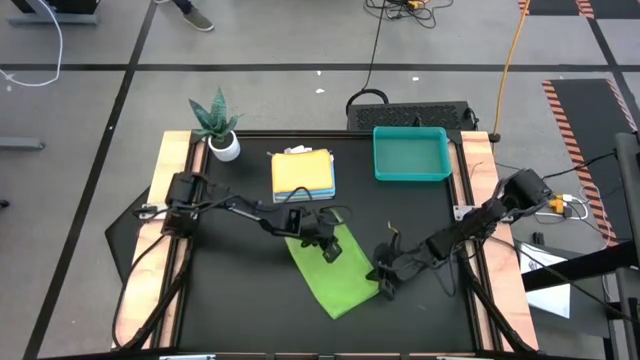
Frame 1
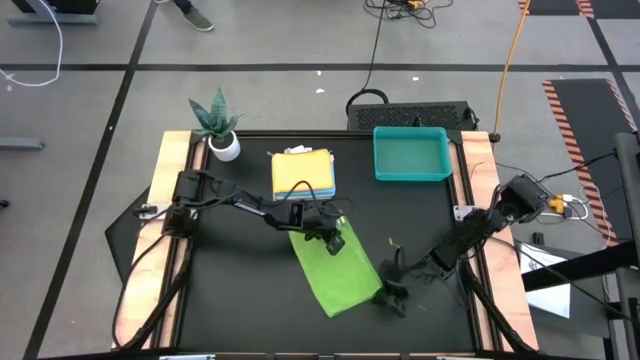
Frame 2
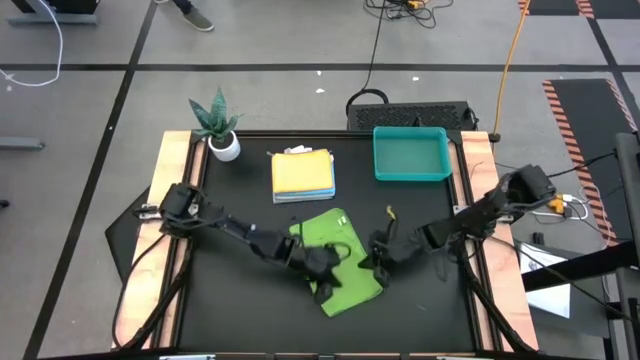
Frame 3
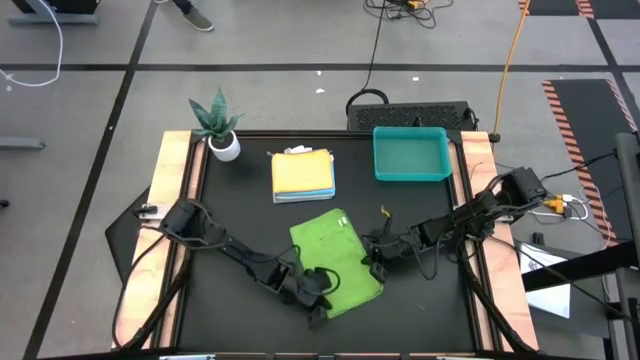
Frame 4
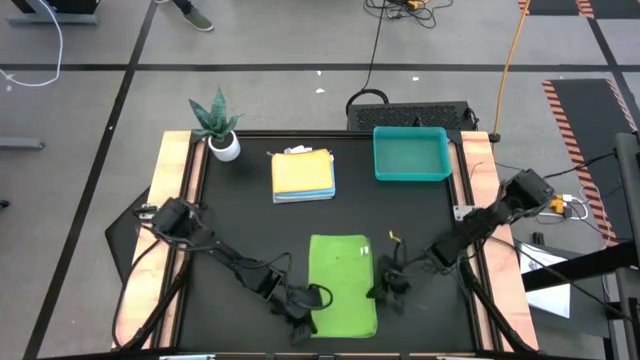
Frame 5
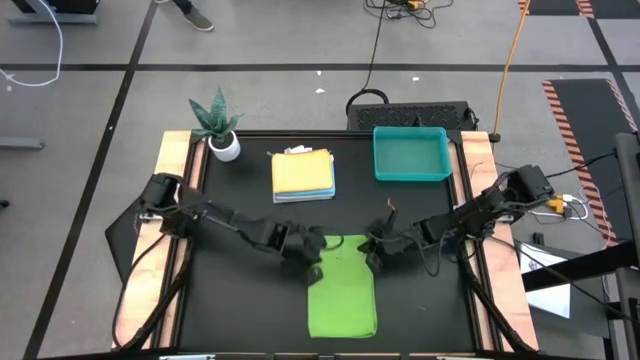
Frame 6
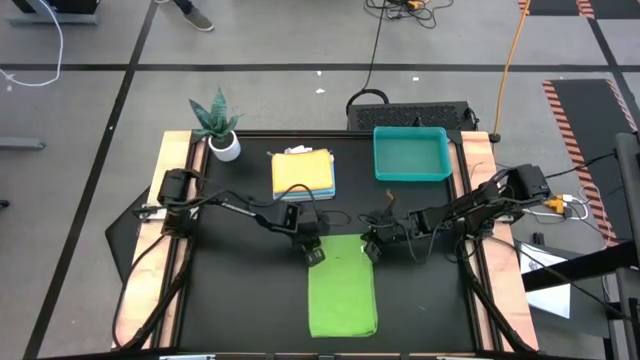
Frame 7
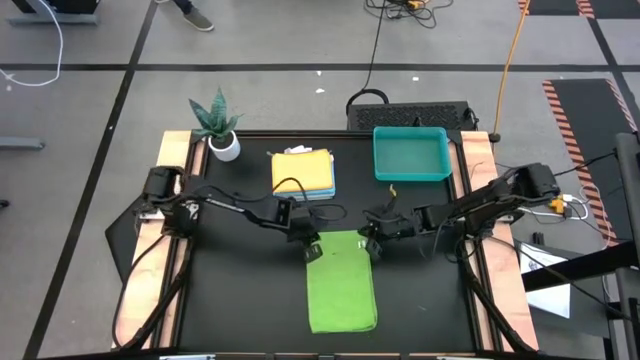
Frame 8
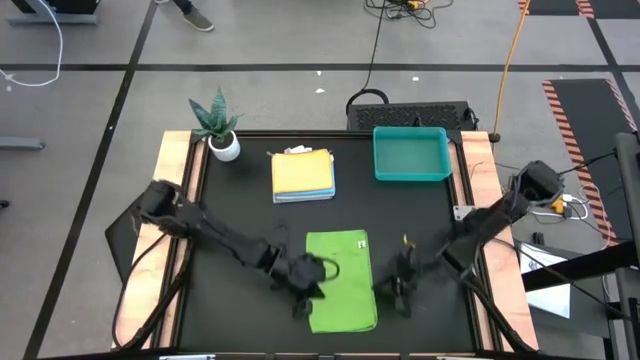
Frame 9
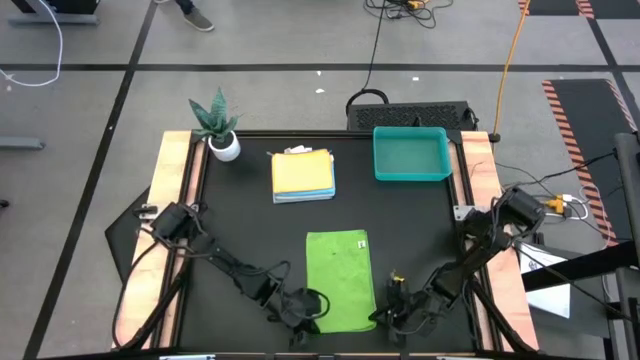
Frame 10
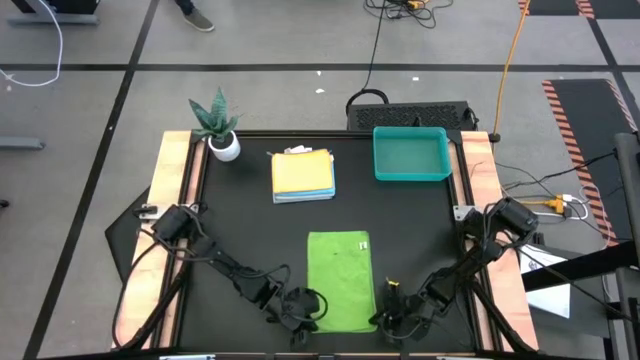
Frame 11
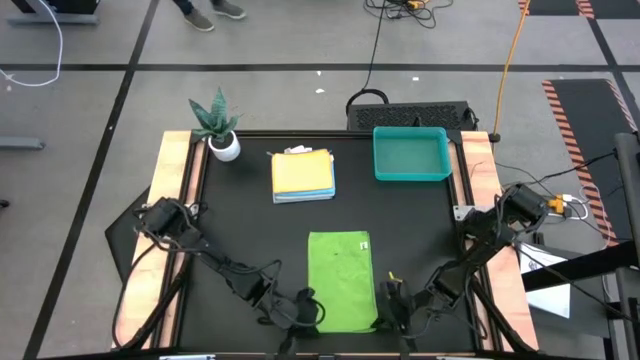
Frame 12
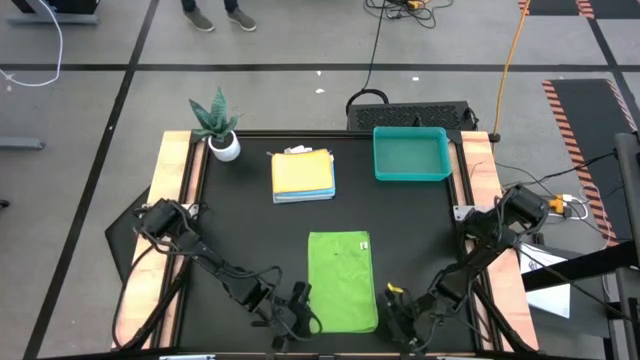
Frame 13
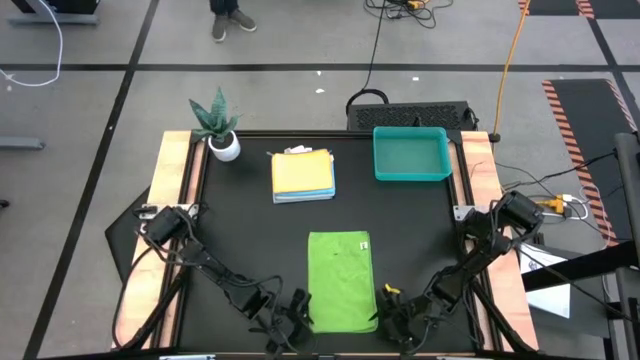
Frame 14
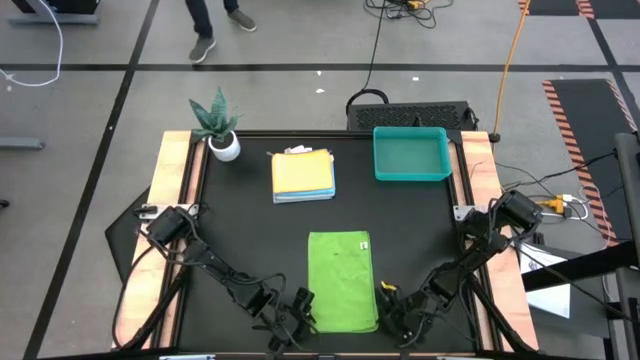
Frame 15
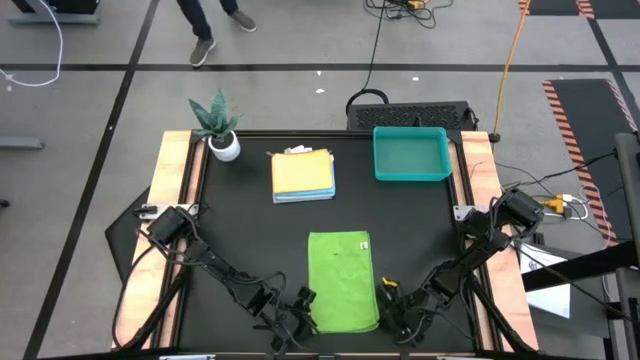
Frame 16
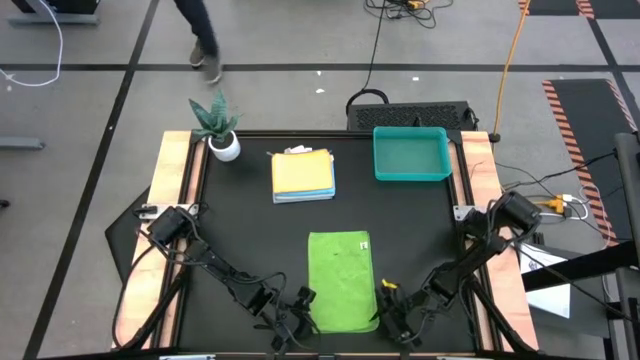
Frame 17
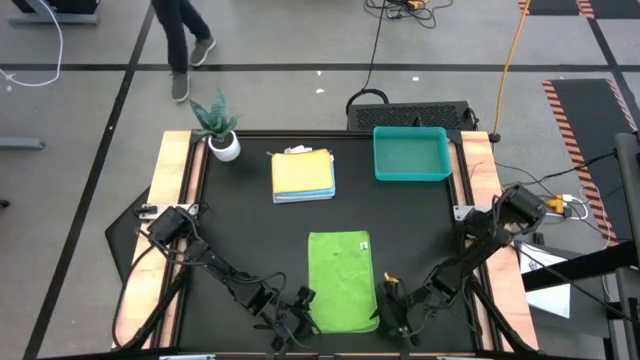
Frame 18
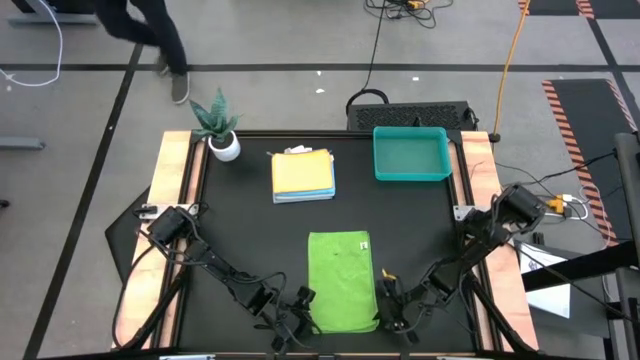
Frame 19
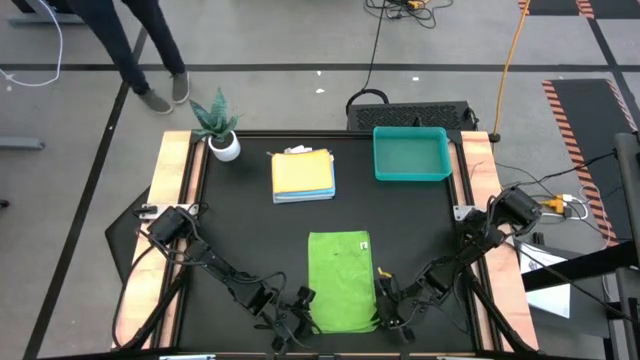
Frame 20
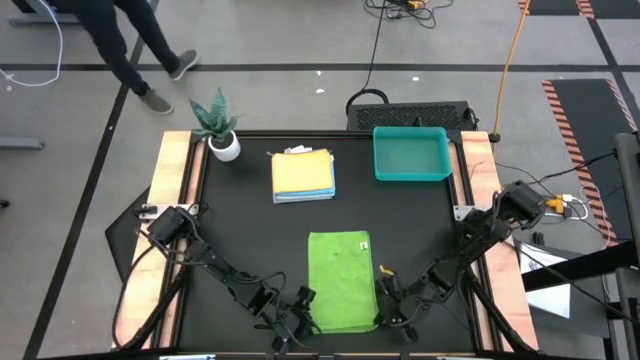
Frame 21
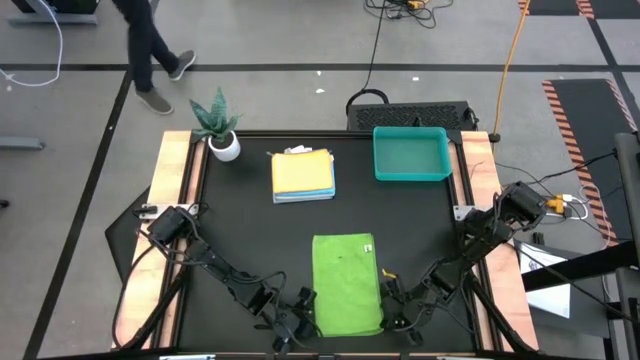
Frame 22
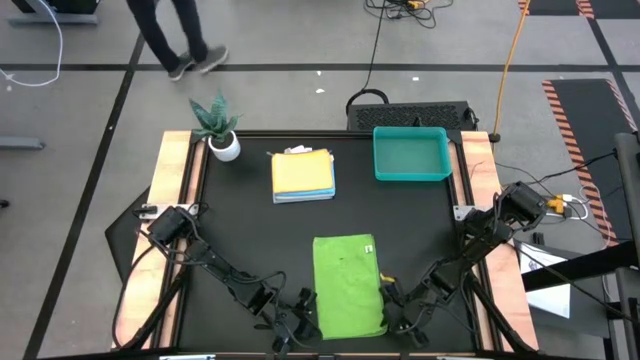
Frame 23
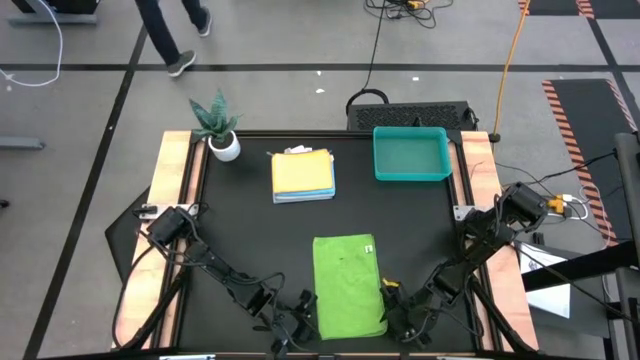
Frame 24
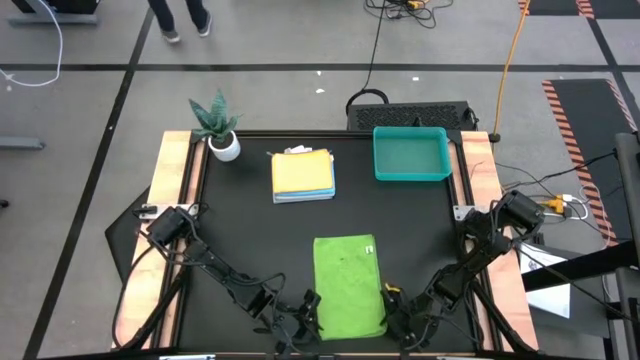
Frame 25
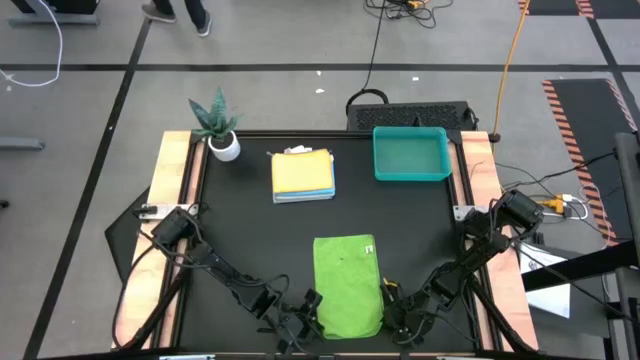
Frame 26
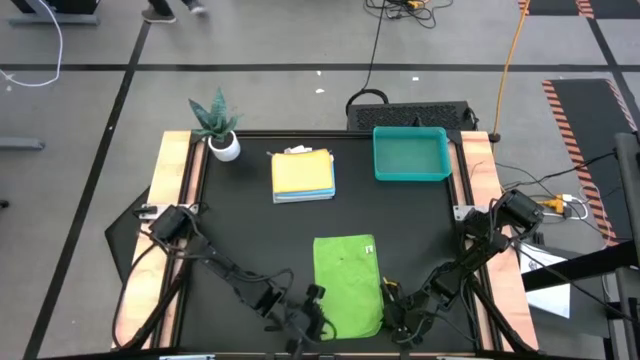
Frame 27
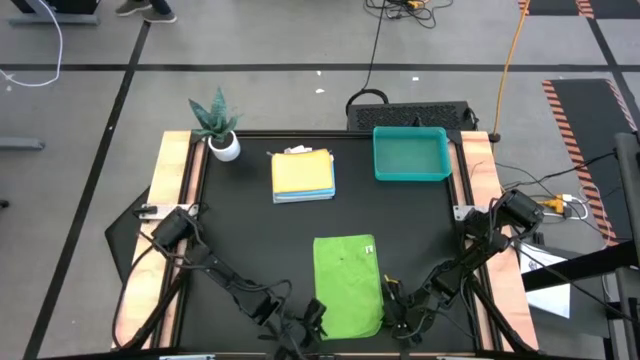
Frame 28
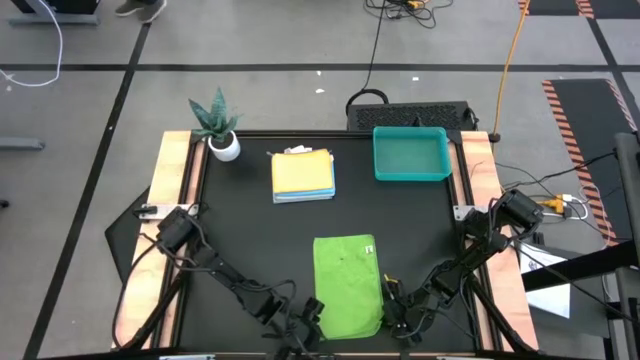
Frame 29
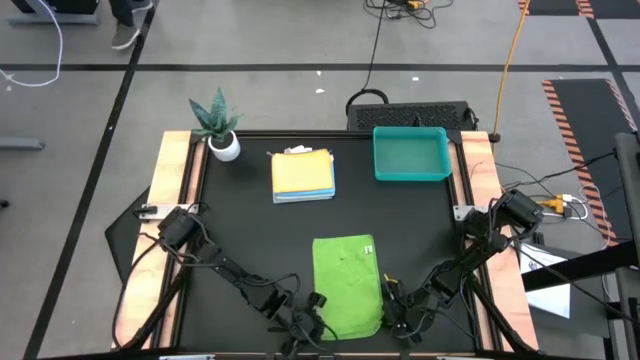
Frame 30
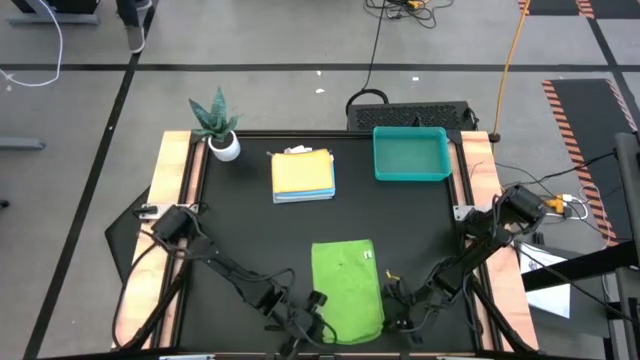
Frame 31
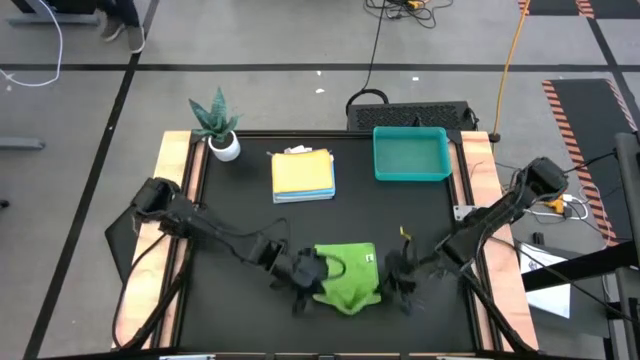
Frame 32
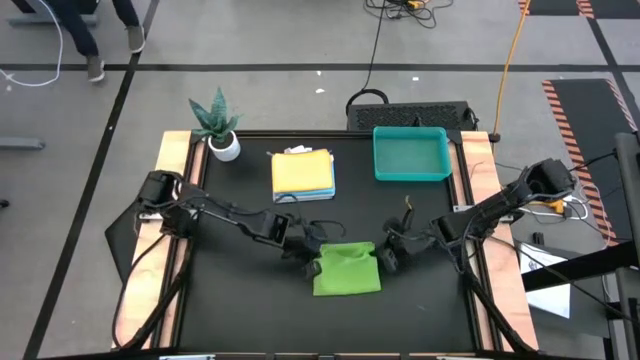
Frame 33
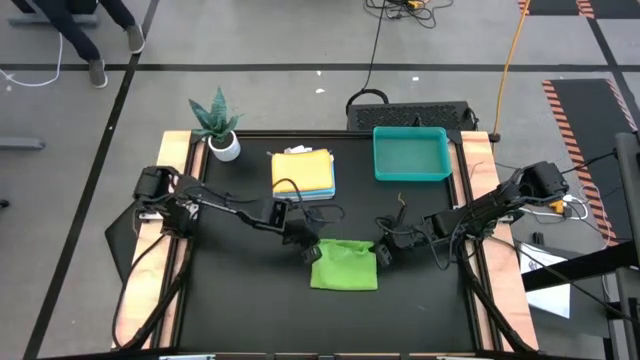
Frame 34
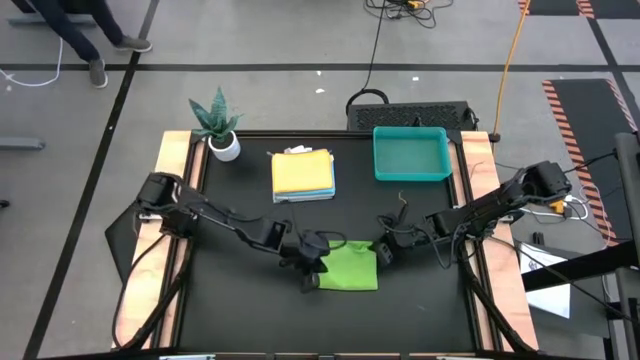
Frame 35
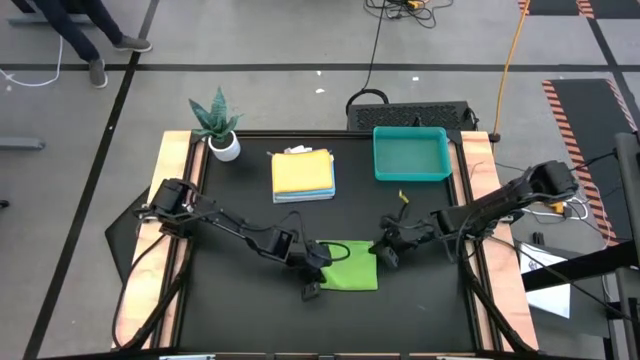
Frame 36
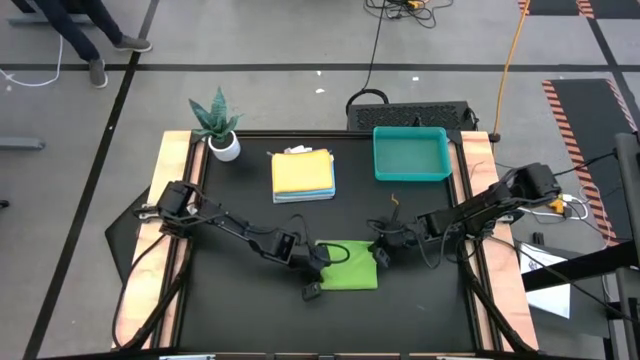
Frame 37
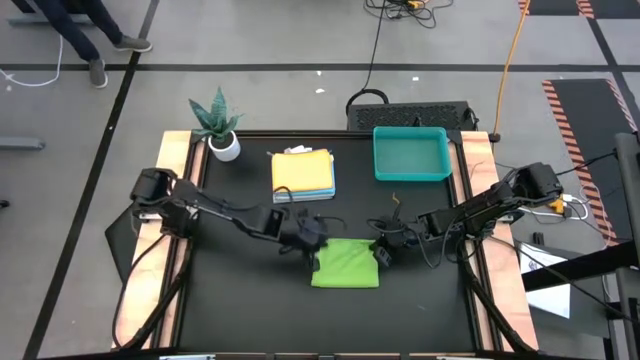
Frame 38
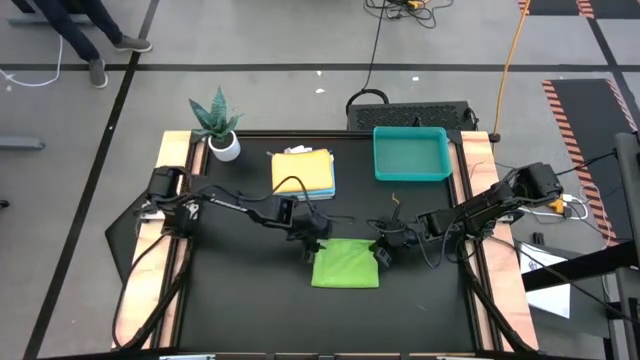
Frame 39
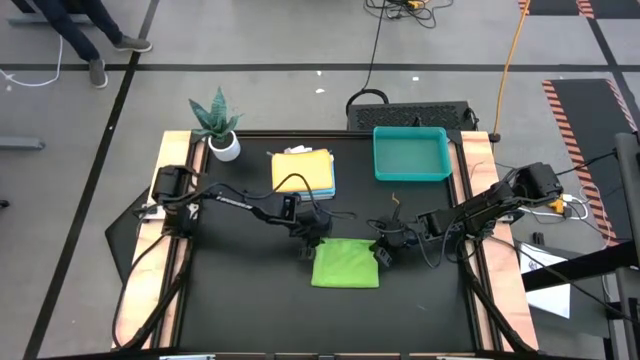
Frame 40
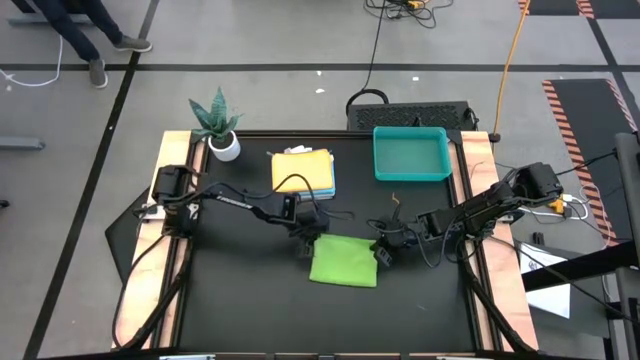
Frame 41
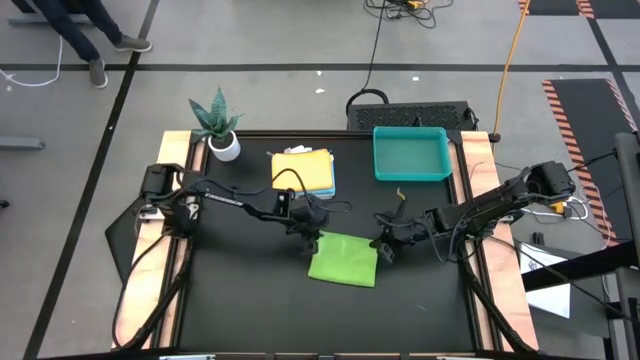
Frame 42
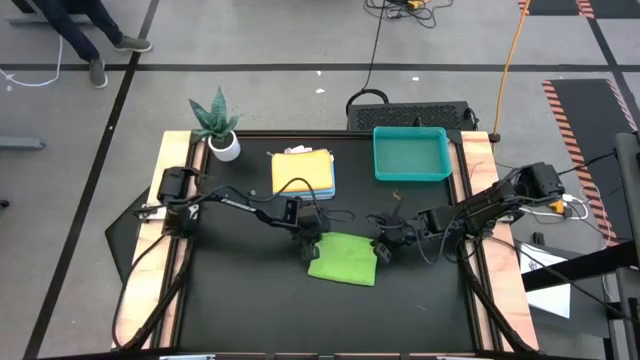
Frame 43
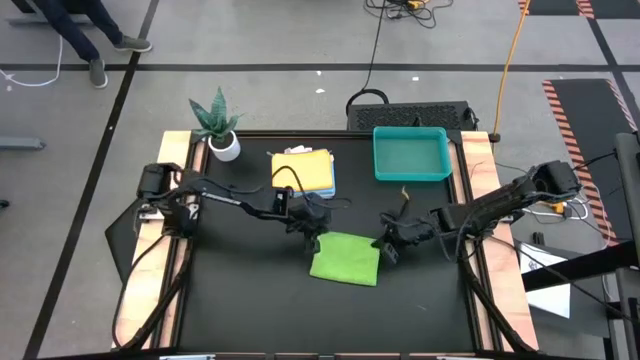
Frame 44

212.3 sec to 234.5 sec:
Task: Fold microfiber towels
Fold the green microfiber towel
